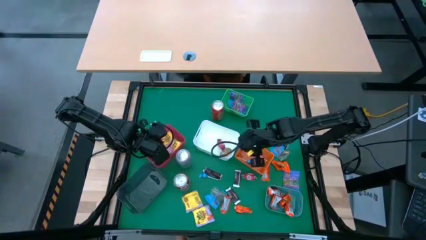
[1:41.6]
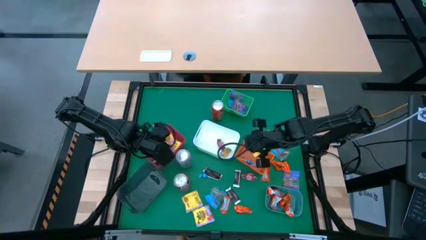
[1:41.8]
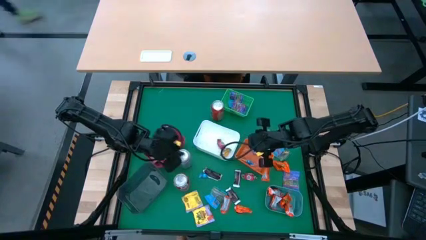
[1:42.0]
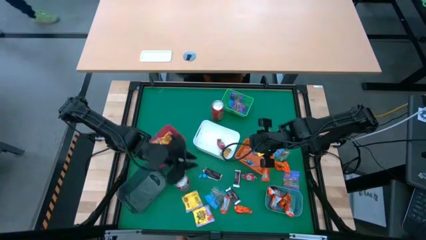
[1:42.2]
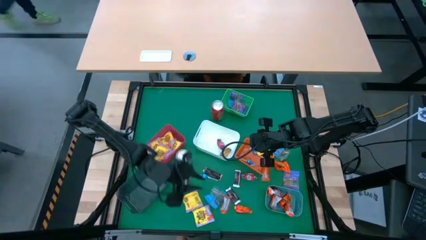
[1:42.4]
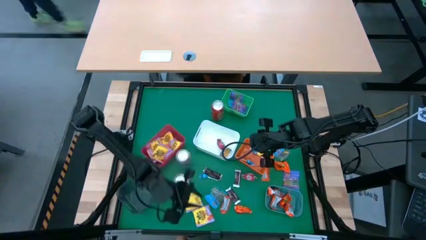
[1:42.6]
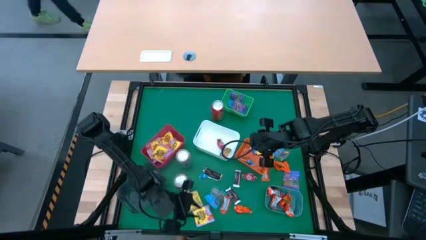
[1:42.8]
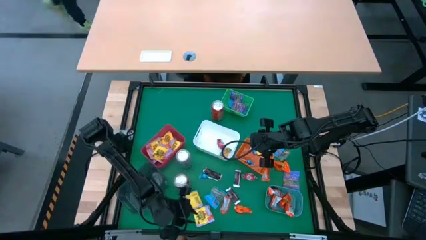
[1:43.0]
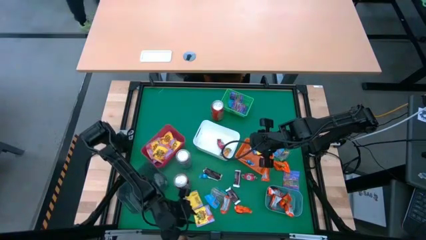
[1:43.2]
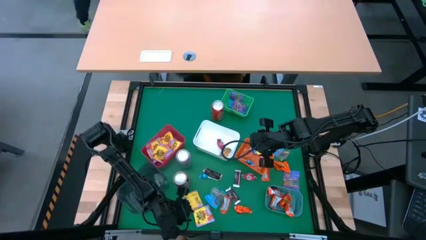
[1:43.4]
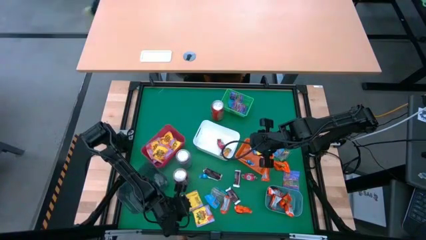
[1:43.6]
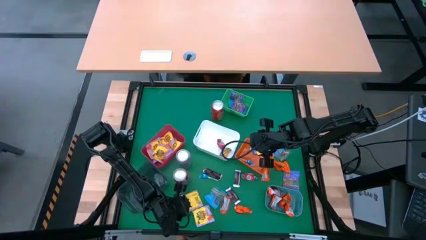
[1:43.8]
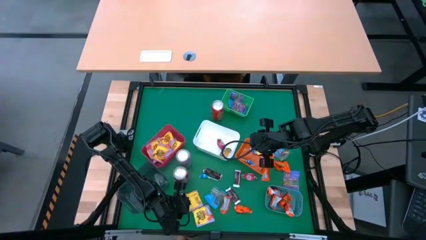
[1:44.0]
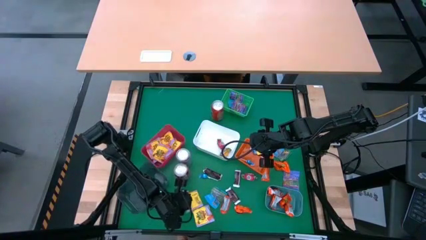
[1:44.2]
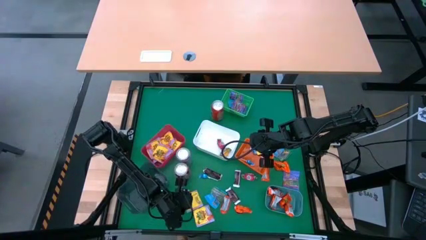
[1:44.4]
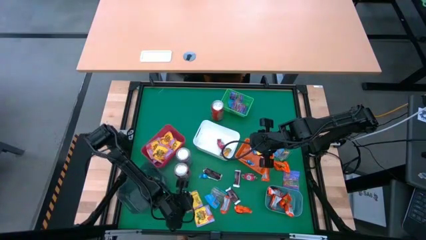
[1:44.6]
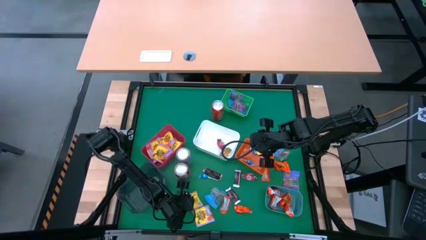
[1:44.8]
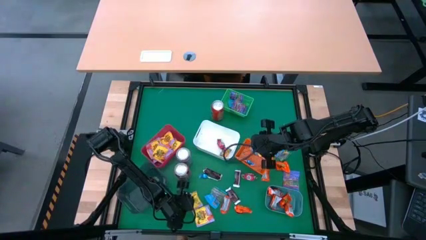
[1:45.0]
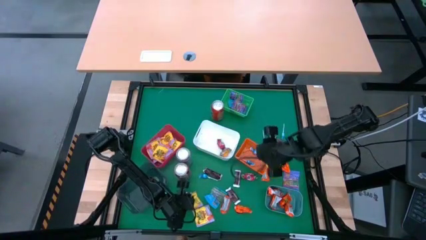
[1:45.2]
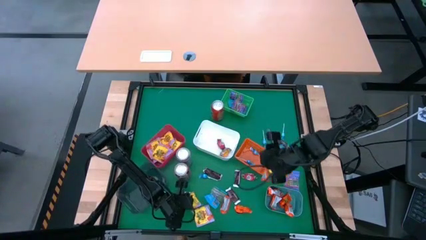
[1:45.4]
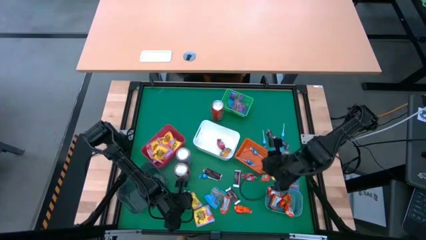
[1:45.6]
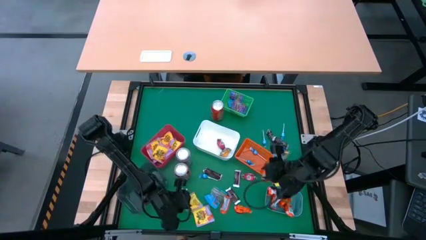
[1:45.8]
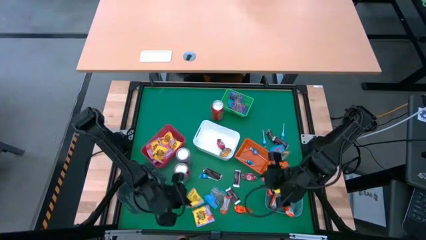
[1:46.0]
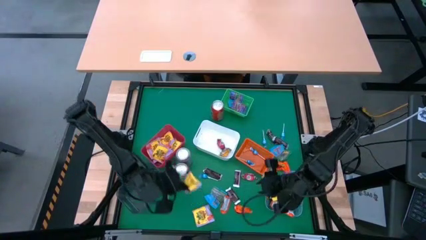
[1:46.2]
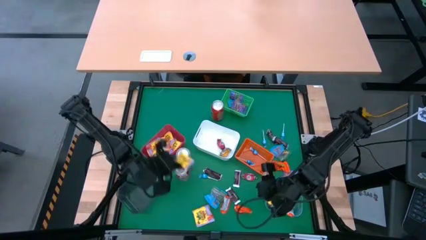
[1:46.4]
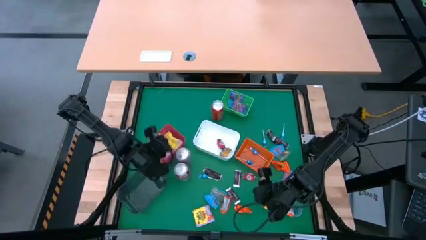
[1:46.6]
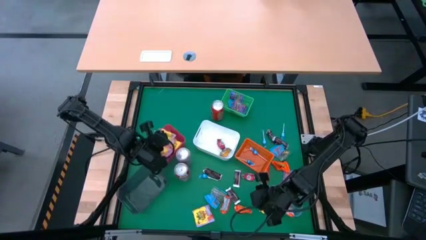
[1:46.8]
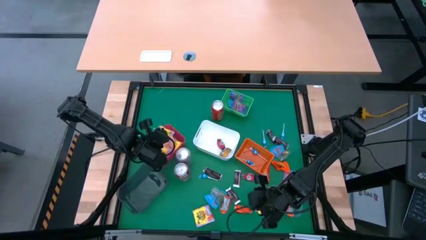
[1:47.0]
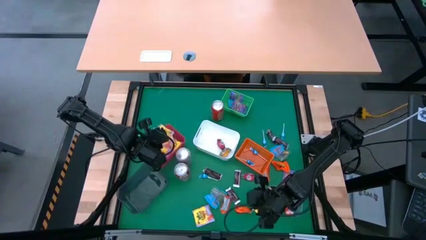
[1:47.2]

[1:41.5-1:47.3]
Task: Sort candy
Put the yellow candy into the red bin

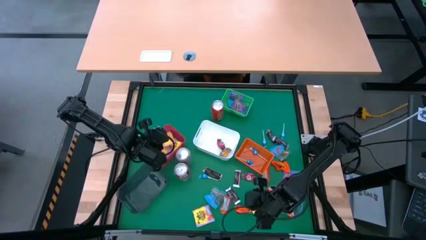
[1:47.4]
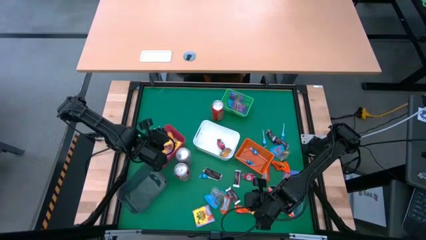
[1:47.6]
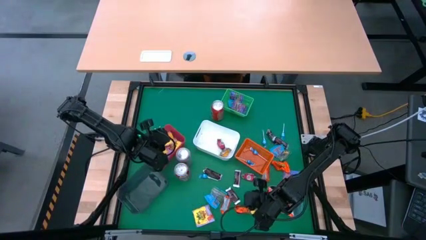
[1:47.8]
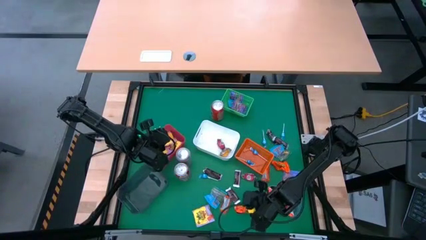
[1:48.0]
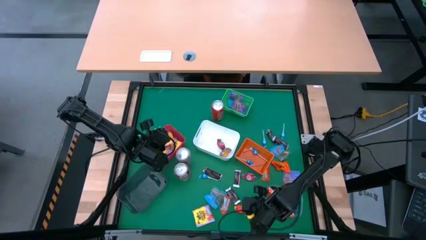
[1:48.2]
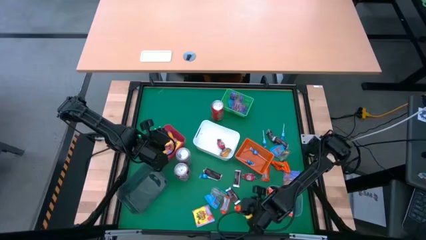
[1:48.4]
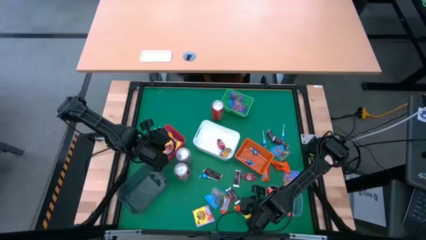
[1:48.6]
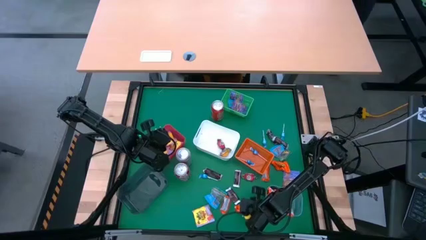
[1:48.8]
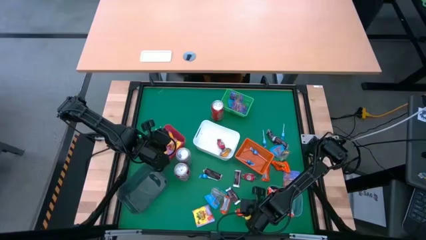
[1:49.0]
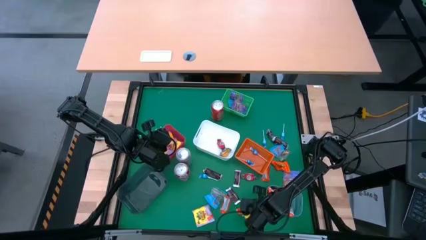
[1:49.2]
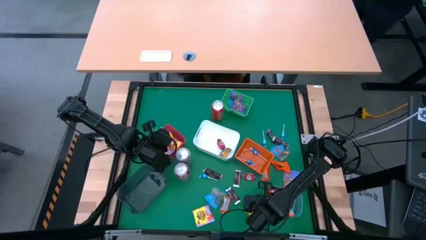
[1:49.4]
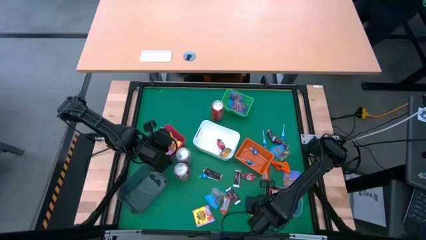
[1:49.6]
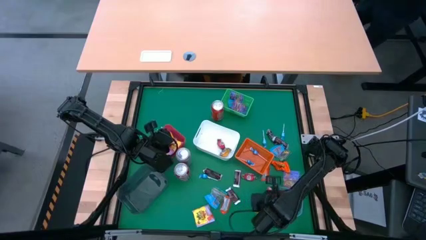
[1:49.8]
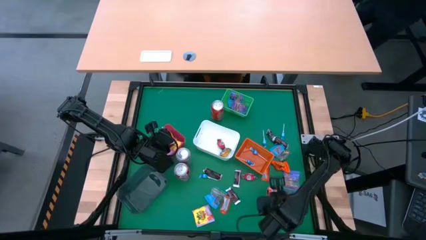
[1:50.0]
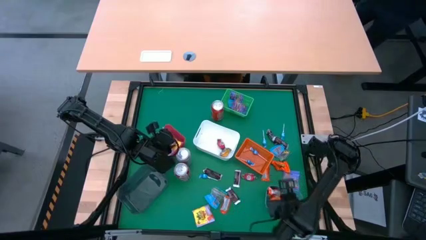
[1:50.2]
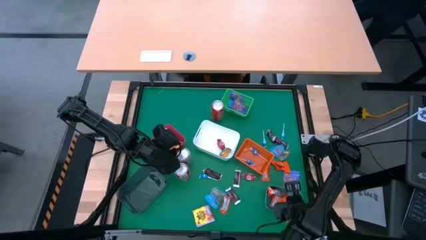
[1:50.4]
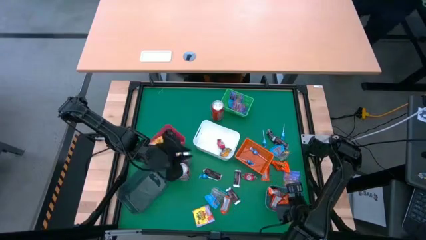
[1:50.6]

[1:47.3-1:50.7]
Put the orange chocolate into the blue bin

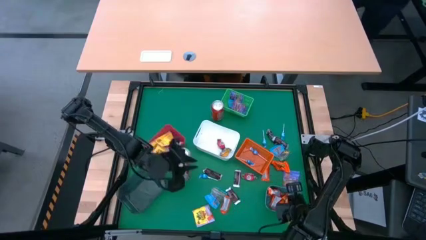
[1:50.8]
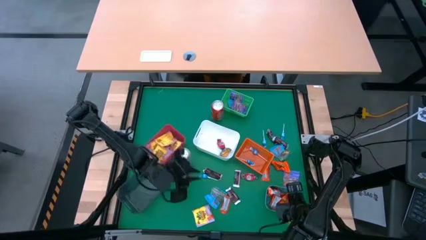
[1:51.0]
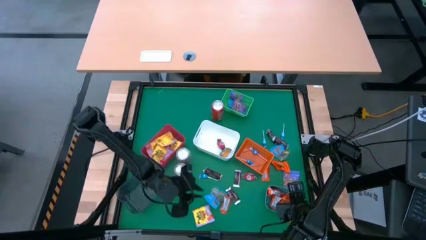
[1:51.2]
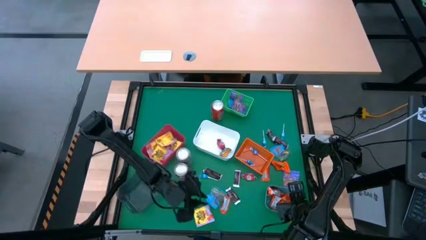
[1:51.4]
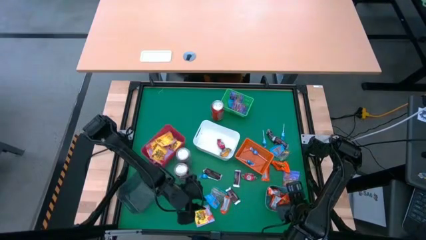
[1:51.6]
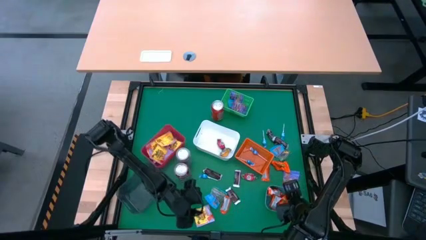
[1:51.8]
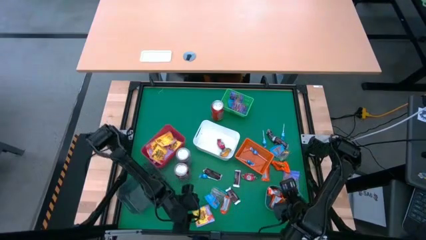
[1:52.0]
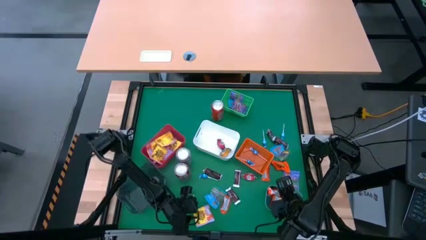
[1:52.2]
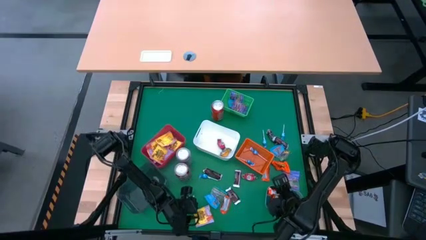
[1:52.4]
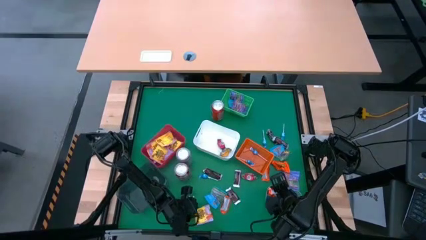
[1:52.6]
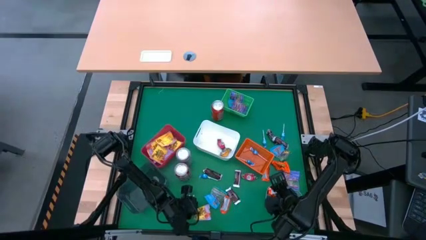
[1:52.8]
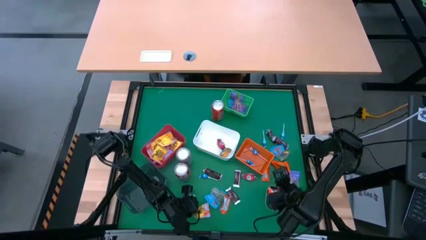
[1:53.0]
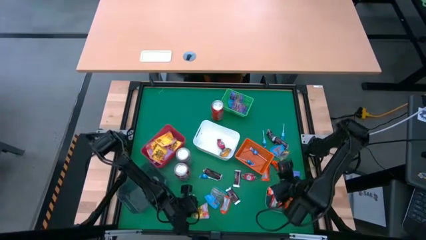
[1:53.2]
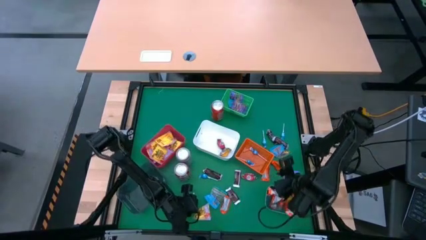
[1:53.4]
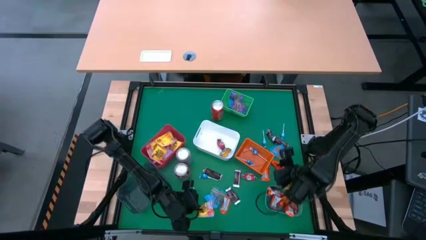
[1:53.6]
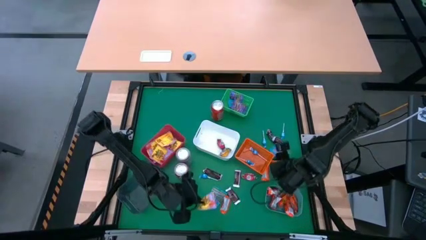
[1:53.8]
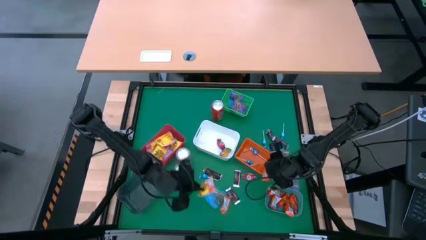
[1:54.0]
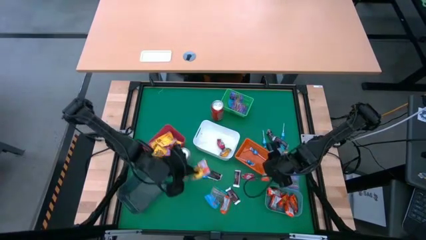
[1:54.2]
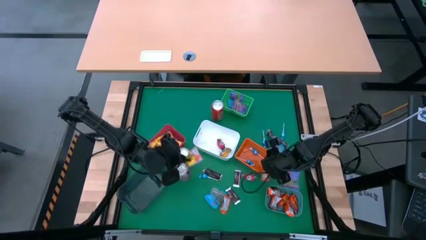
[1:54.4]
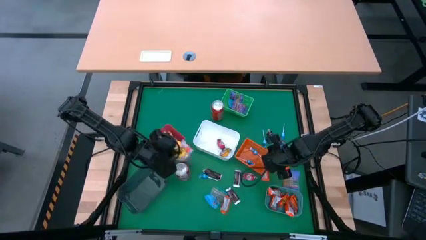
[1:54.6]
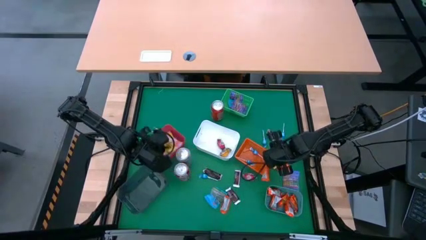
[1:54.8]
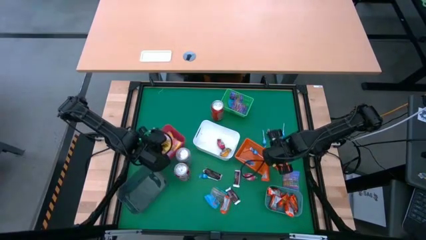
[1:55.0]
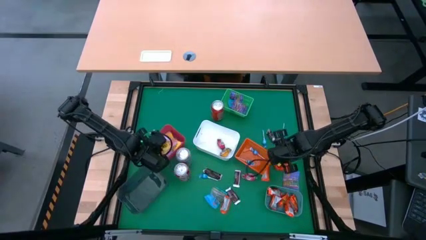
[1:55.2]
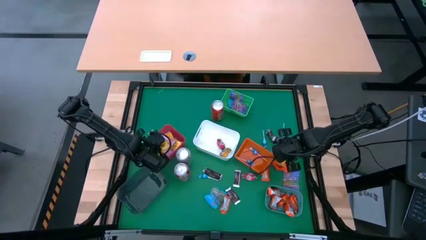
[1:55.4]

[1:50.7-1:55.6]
Put the yellow candy into the red bin

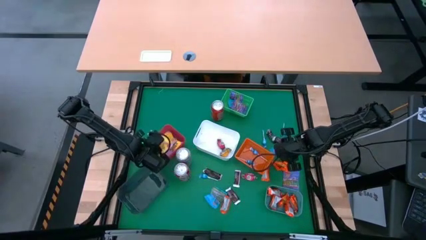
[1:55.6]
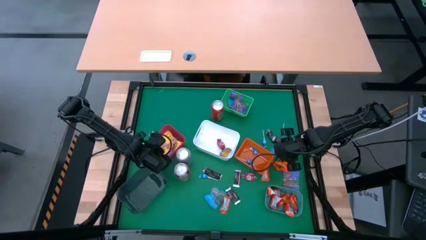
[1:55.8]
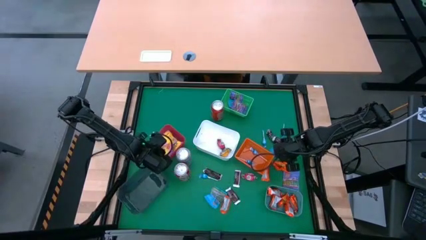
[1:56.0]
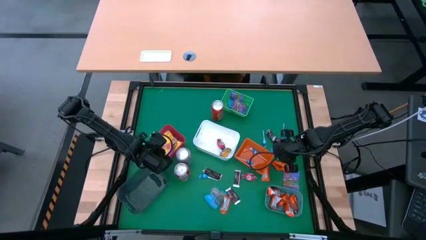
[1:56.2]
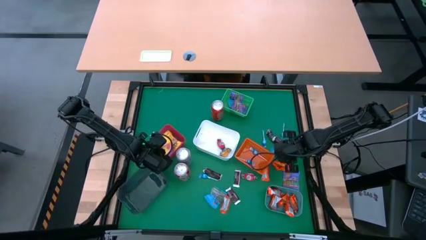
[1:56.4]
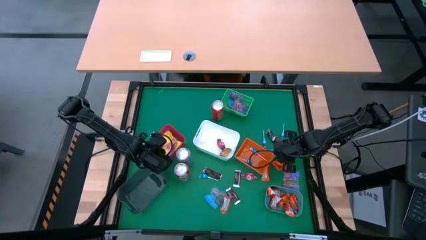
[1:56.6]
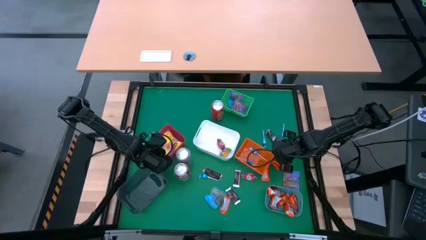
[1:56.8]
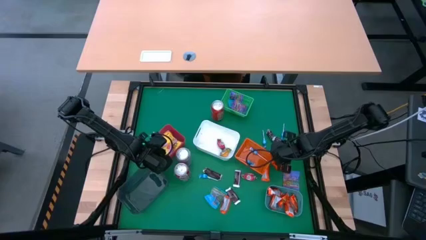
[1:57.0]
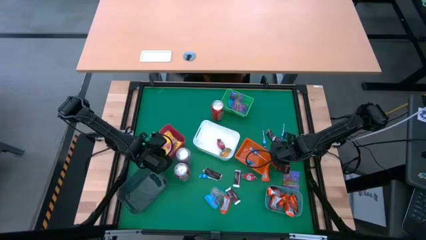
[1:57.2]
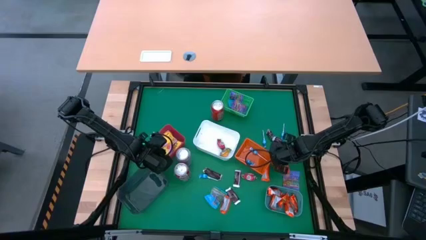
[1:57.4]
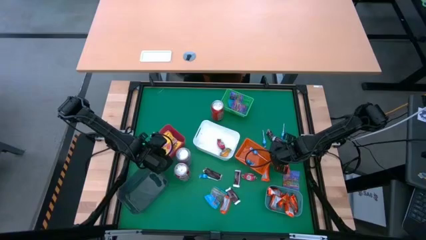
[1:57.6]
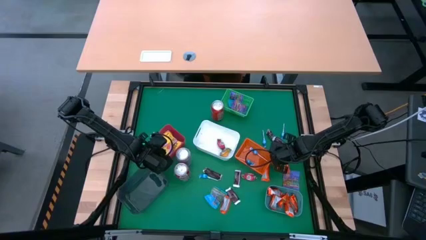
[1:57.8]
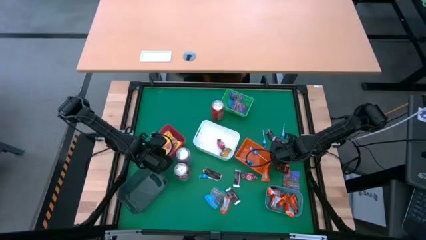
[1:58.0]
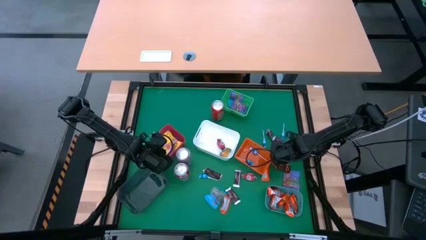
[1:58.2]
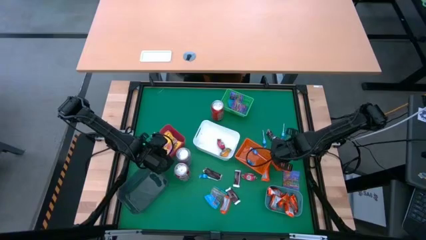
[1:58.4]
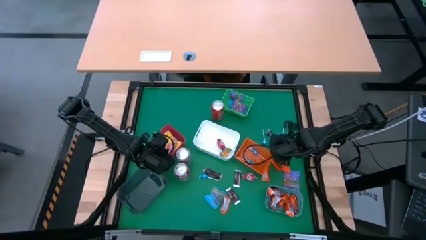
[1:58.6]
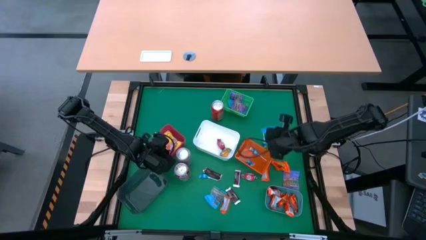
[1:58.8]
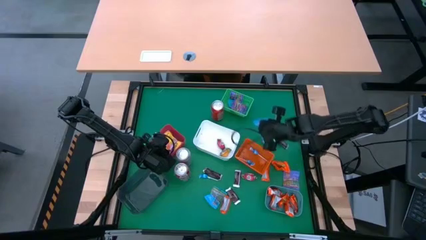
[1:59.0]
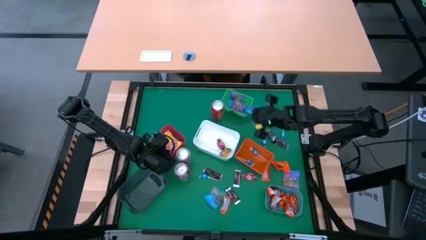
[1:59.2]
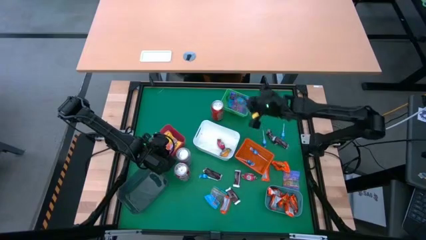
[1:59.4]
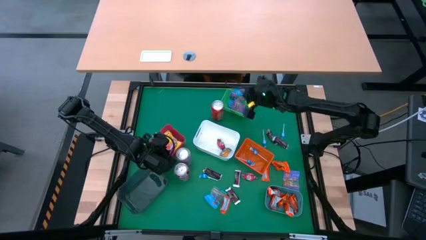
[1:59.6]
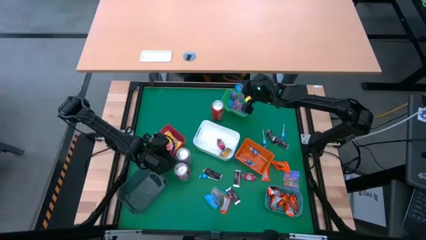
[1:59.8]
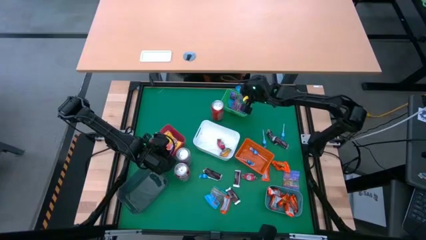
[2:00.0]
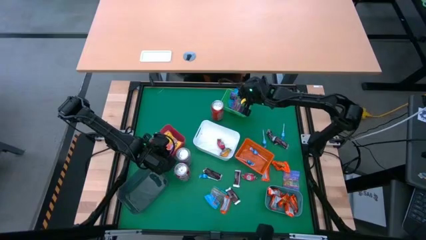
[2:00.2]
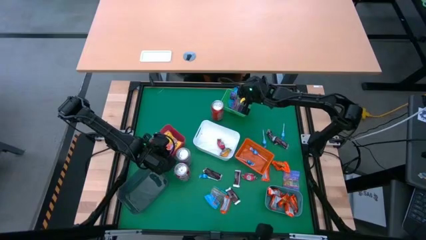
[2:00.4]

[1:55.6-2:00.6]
Put the blue candy into the green bin
